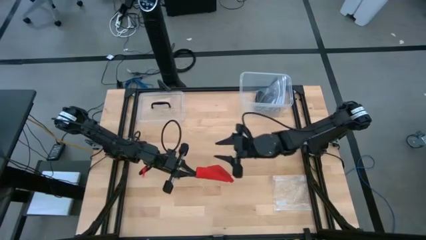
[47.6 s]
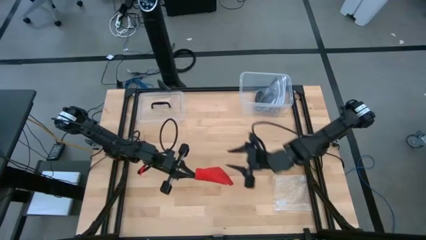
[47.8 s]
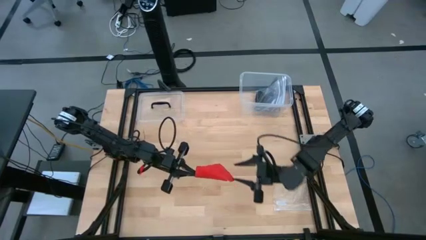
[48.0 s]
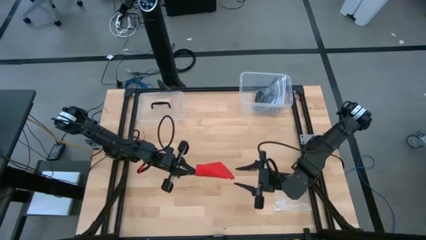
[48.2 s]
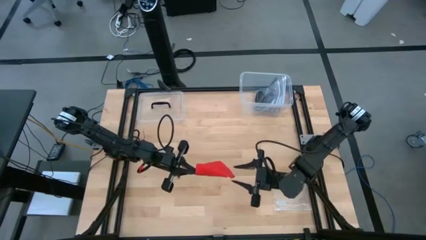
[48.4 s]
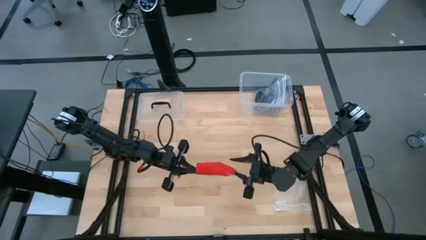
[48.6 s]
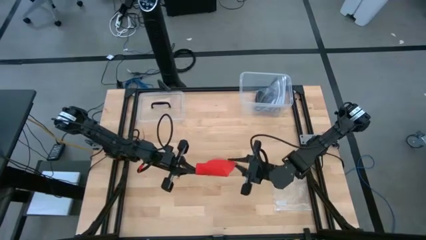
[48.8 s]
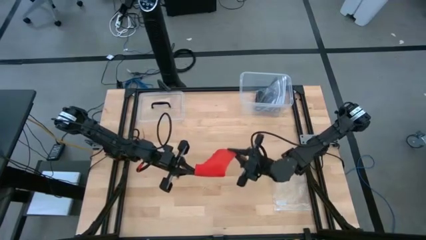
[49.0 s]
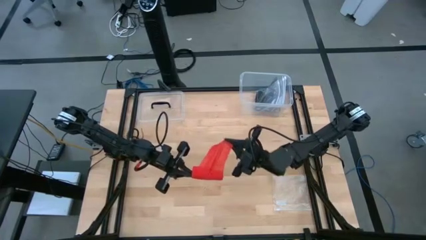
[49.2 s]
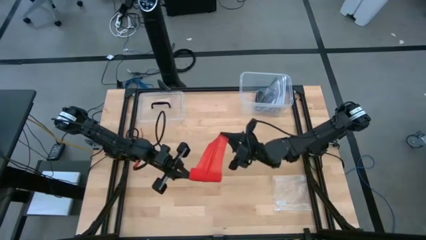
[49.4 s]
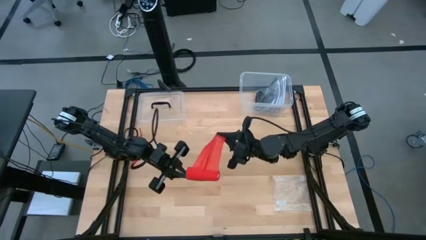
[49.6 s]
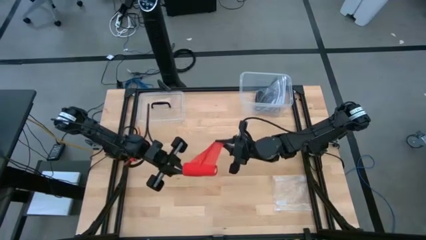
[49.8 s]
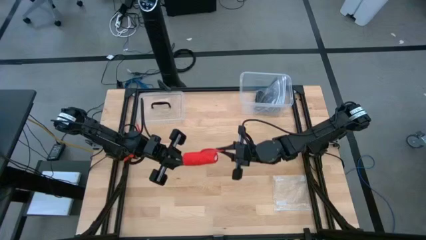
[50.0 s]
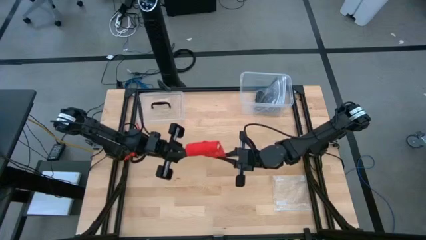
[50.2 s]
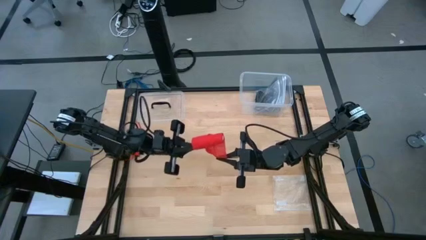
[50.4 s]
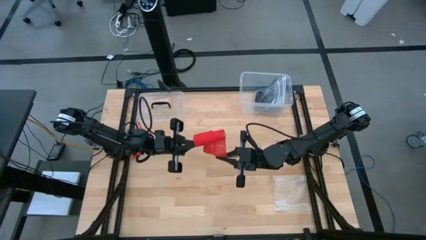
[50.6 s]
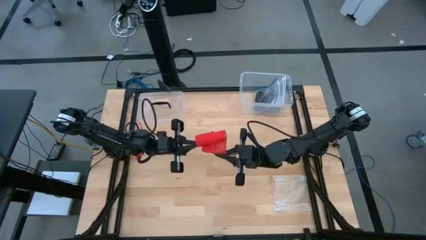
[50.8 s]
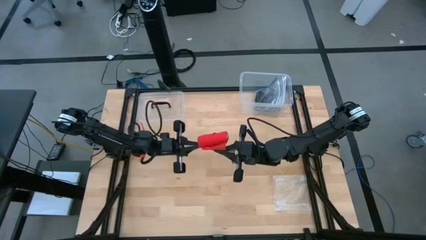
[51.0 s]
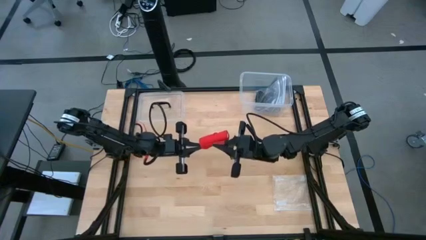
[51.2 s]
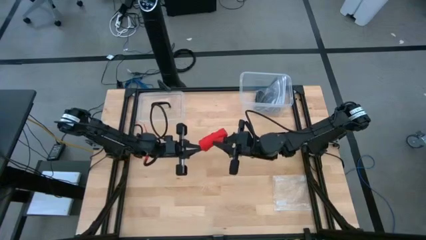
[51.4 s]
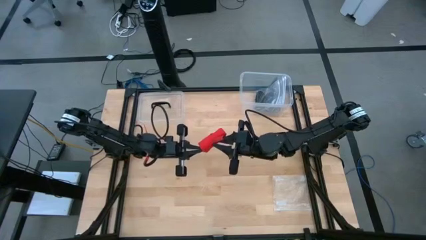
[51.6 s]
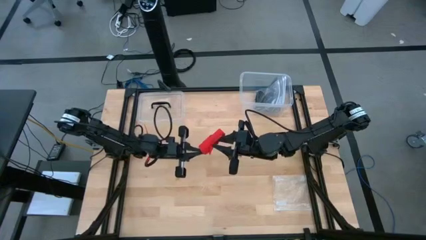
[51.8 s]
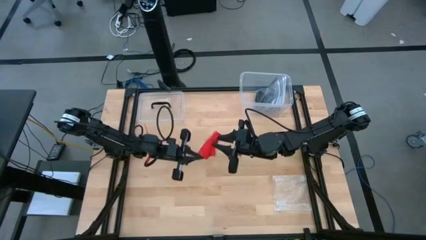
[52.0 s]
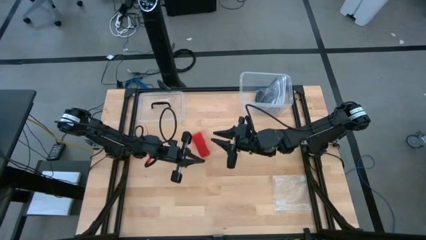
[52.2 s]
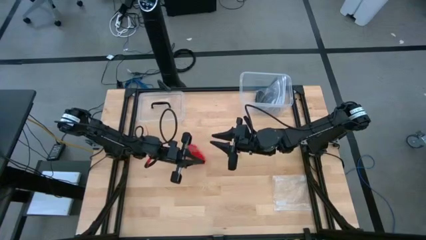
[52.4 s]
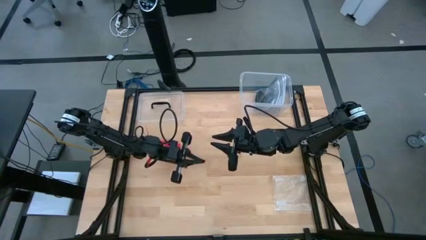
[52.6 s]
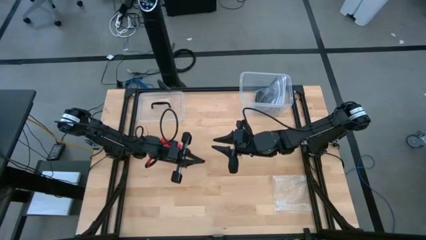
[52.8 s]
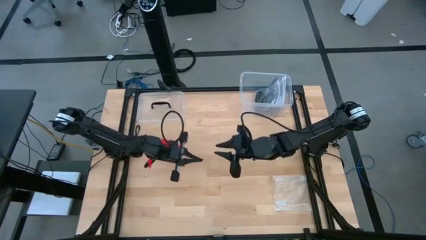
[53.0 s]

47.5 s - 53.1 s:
Task: Roll bandage
Roll the red bandage

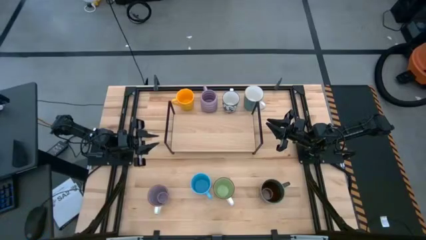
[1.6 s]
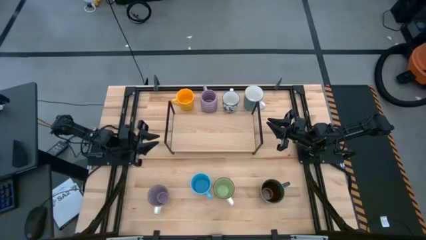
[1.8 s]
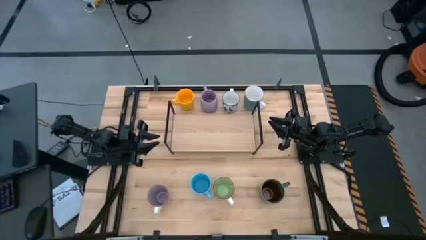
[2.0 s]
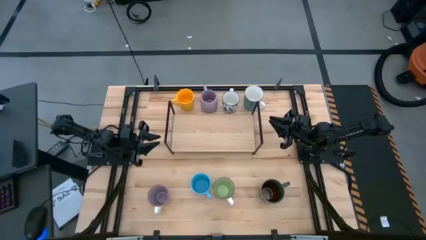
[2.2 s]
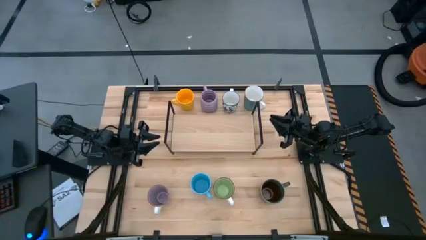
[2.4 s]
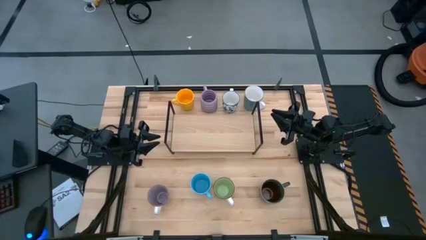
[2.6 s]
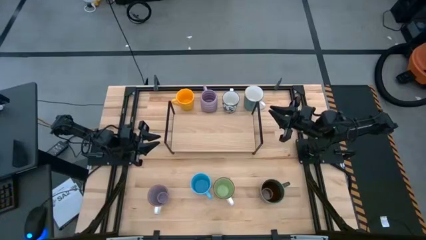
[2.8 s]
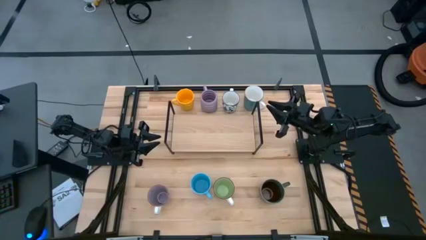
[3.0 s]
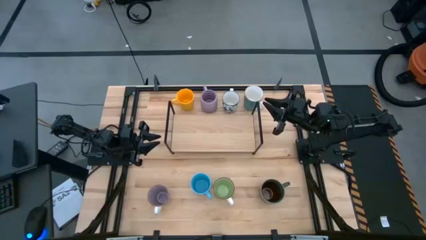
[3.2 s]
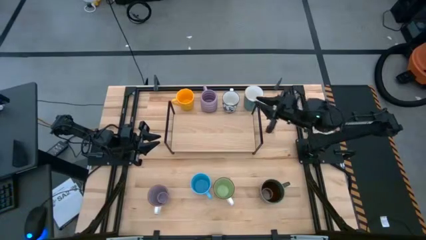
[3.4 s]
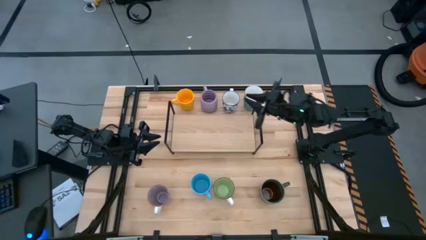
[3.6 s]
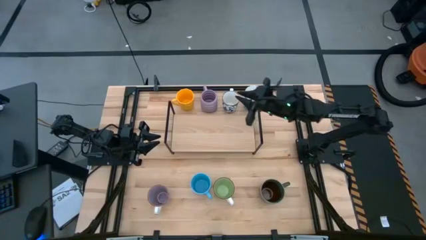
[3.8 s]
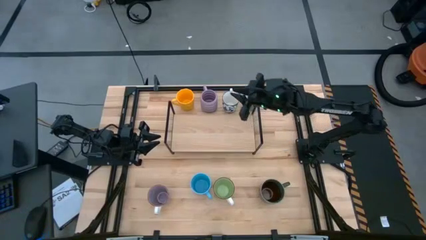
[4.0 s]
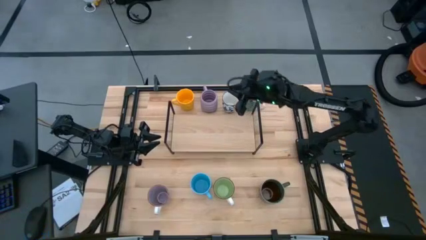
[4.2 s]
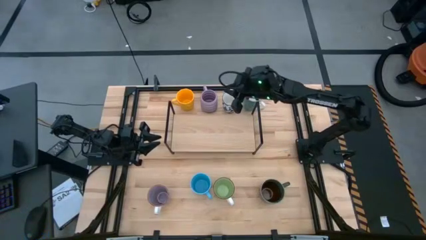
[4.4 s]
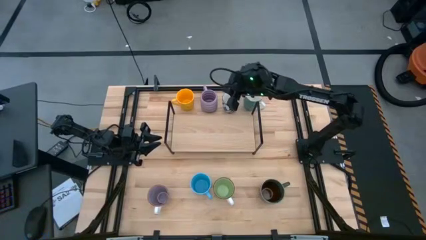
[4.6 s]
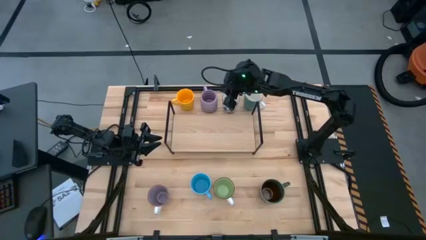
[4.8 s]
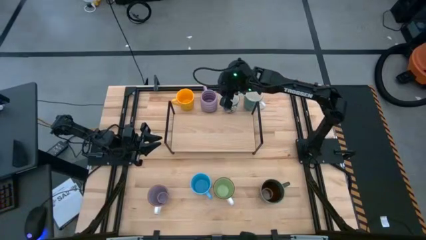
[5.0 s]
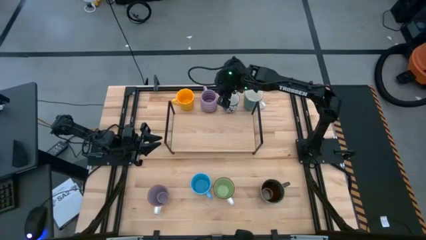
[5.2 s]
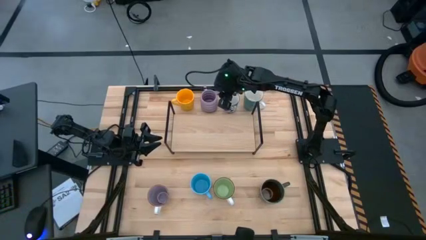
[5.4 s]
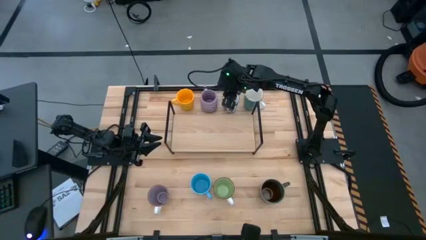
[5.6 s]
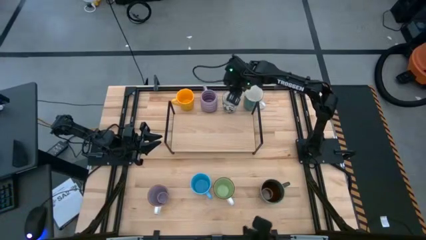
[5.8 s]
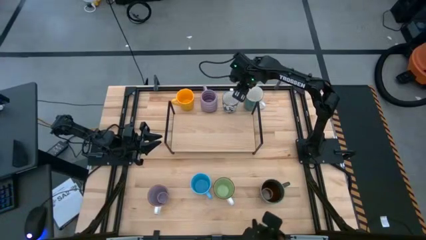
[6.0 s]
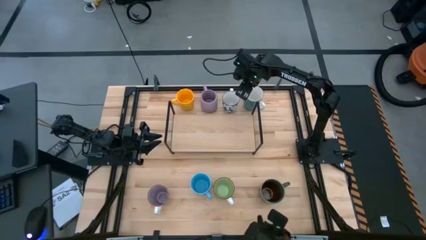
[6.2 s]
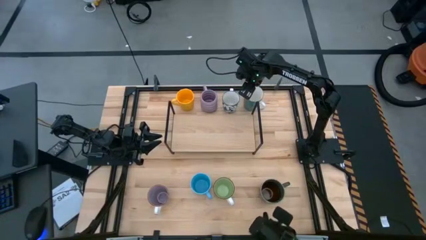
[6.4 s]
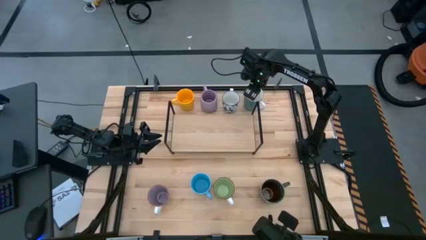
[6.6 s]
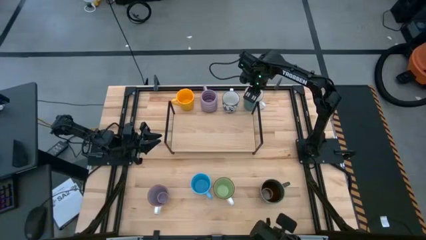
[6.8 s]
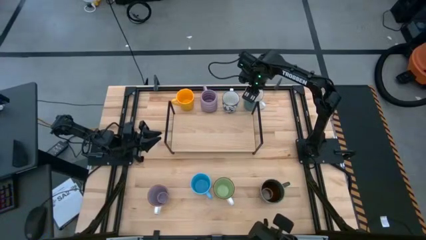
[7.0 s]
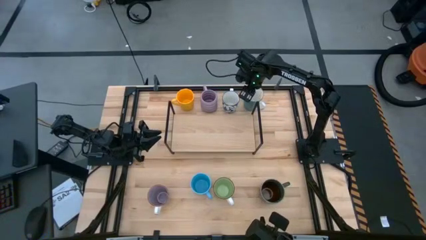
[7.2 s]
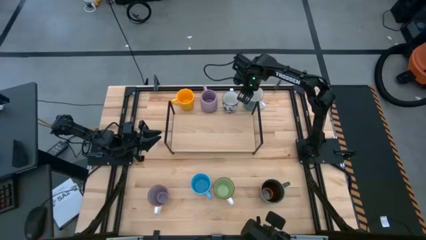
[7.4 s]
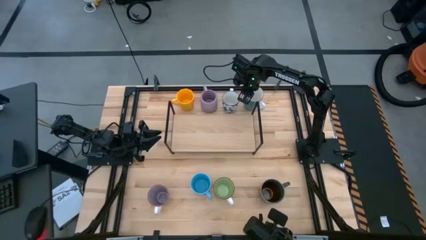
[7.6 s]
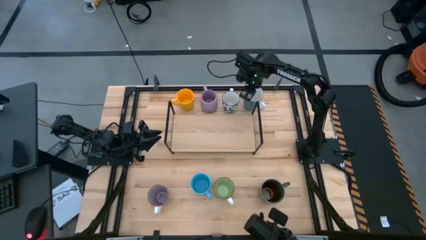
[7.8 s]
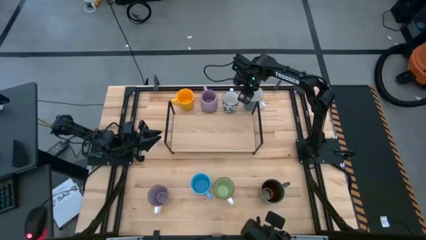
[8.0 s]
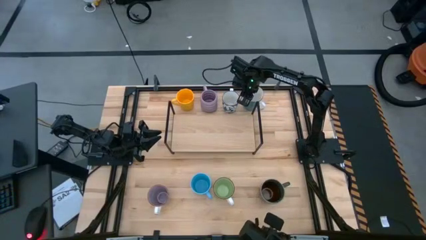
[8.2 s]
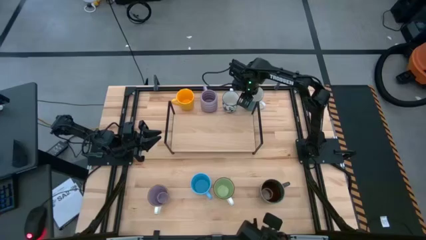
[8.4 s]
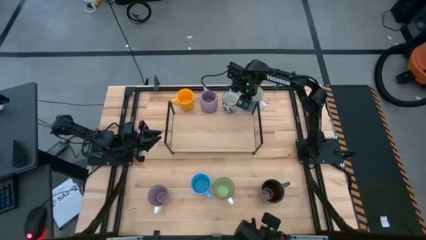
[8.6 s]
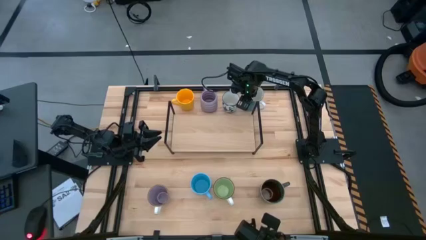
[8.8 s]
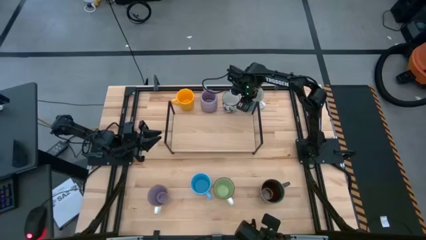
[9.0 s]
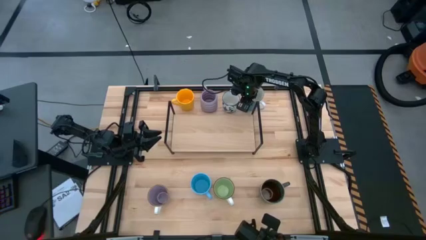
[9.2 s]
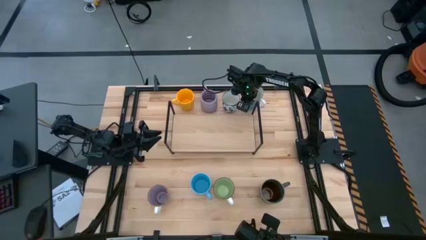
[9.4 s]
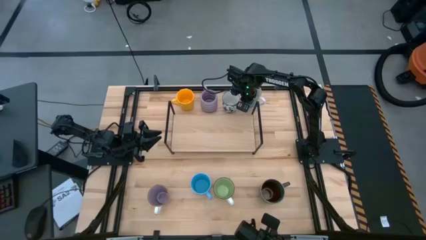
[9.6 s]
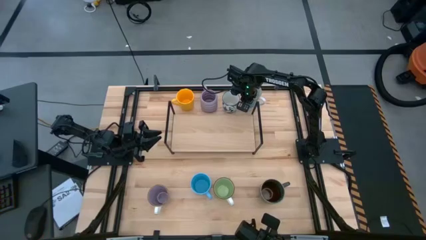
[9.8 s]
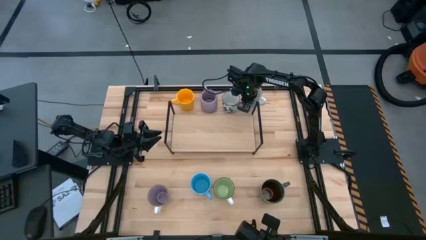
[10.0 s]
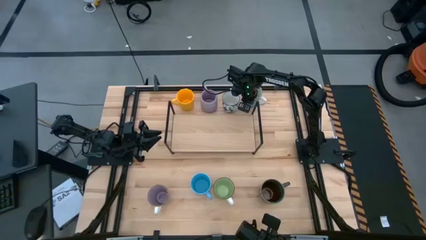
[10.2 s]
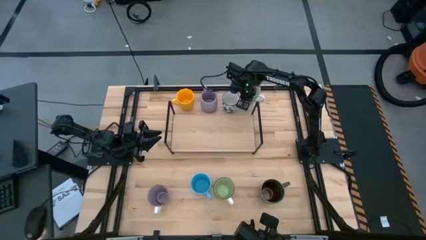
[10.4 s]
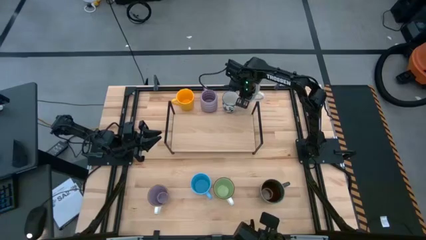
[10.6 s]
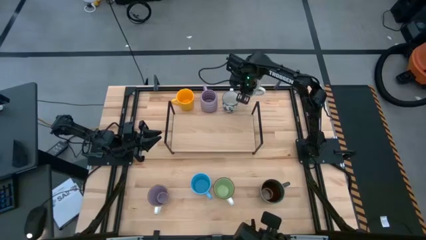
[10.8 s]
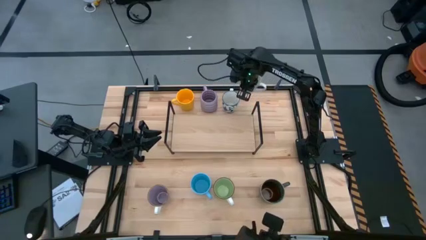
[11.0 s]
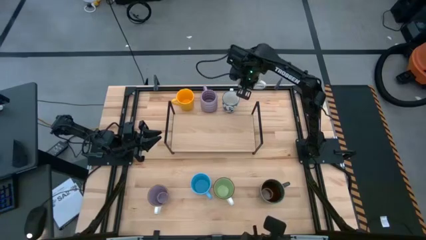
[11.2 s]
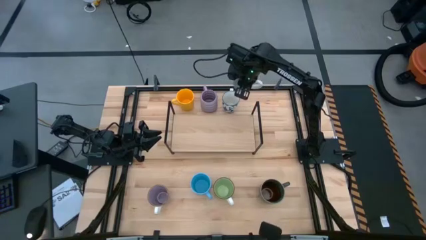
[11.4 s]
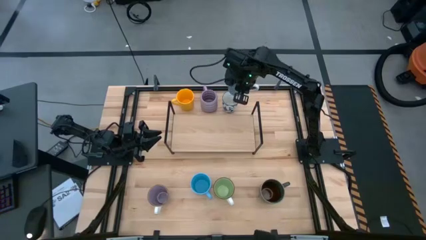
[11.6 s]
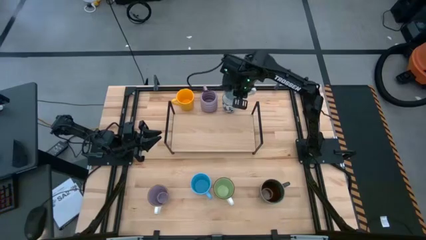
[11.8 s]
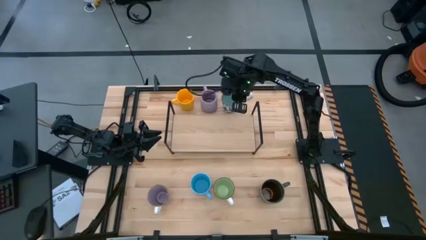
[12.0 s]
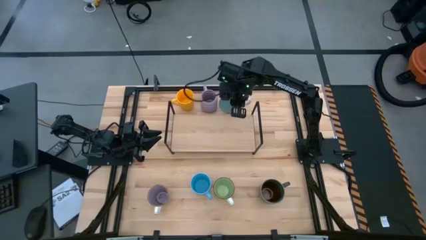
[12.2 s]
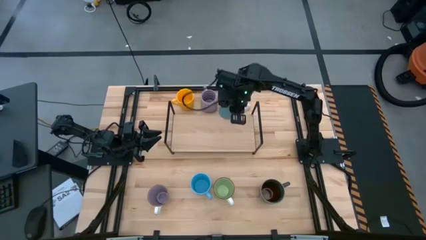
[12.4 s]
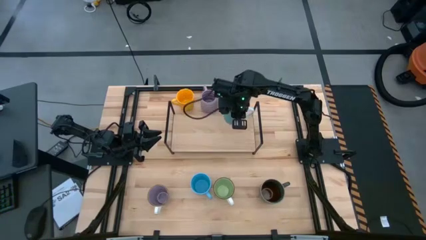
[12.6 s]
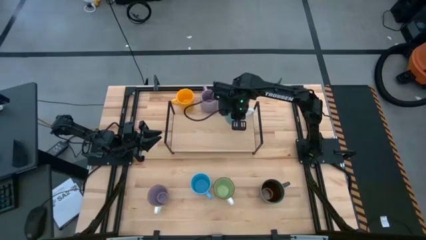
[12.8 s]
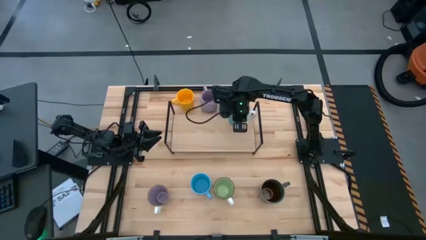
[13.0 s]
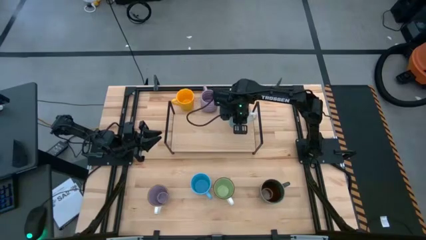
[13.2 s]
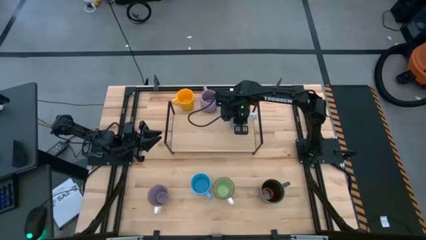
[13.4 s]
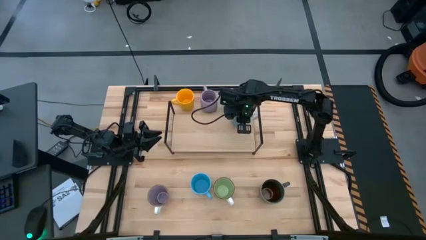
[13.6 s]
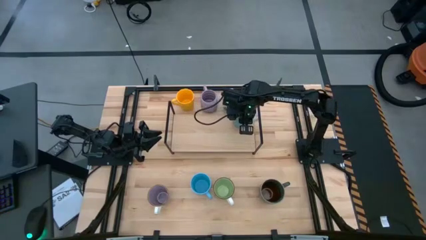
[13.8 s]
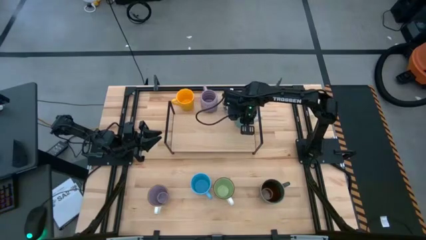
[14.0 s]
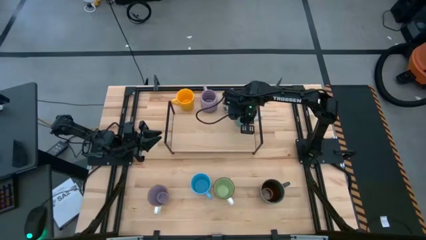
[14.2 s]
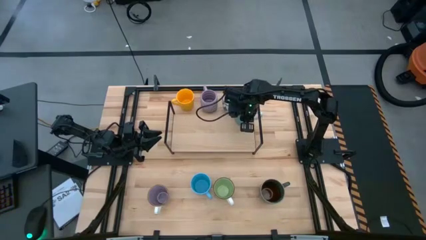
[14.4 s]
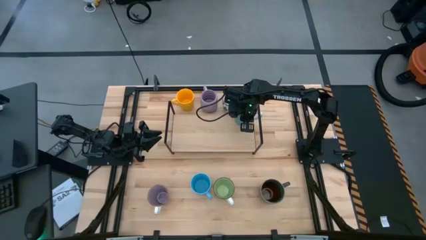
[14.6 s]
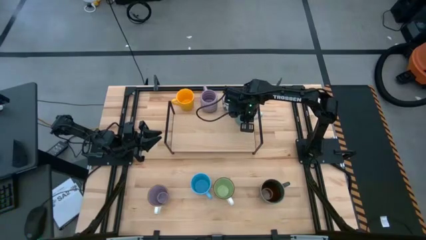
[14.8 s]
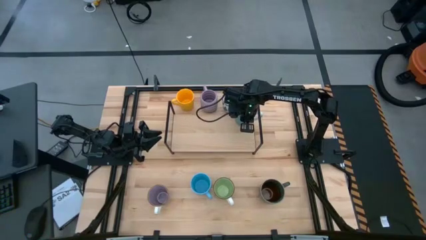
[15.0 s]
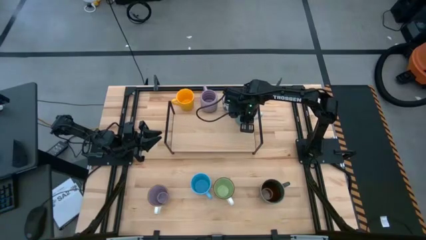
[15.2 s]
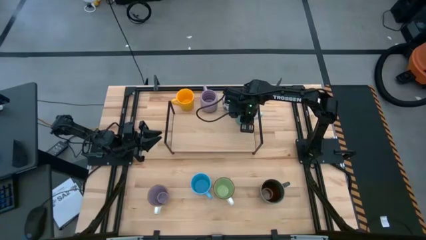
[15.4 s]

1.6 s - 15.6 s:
Task: Place coffee mugs
Put the dark blue mug on the shelf
